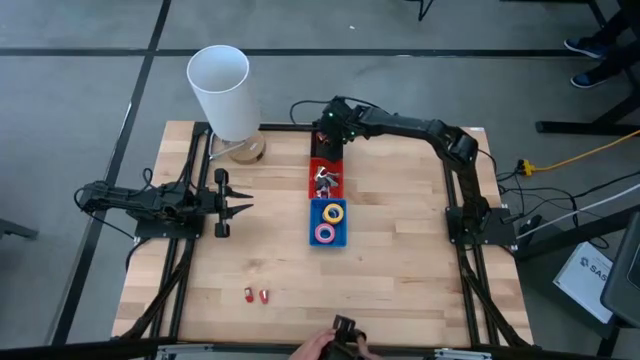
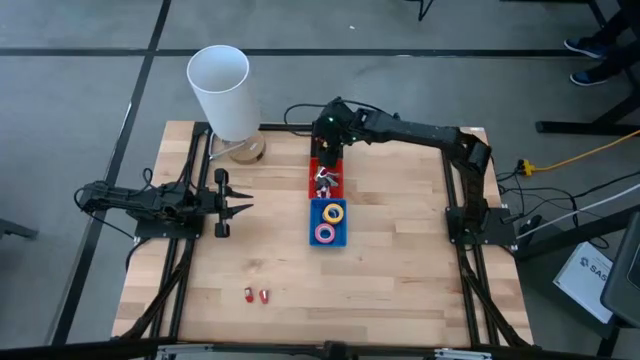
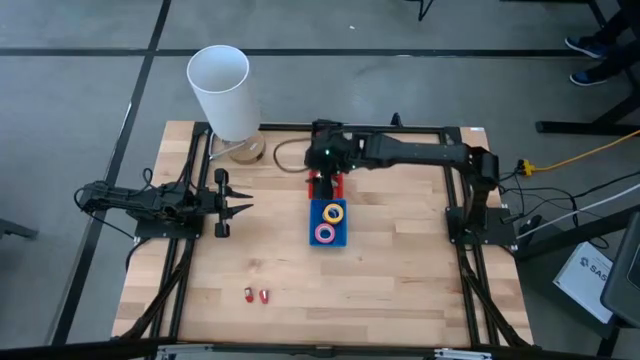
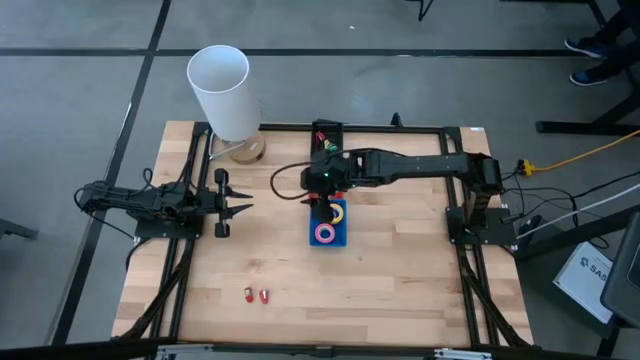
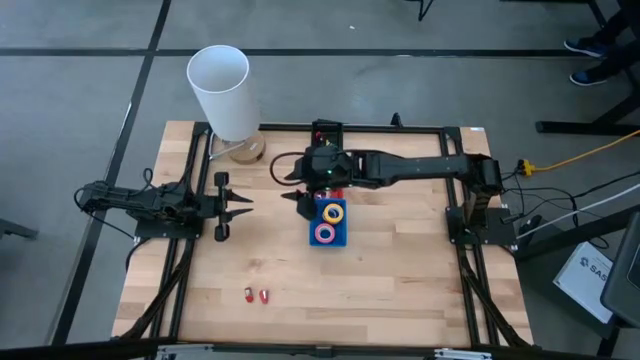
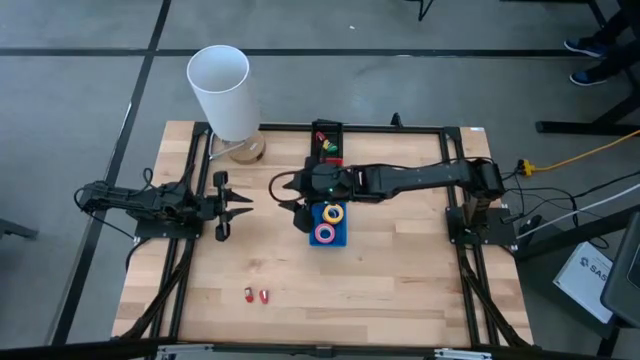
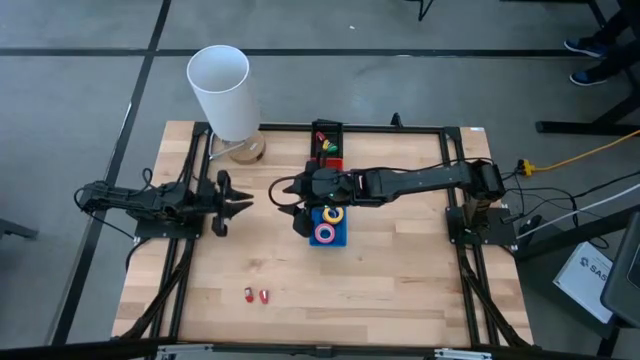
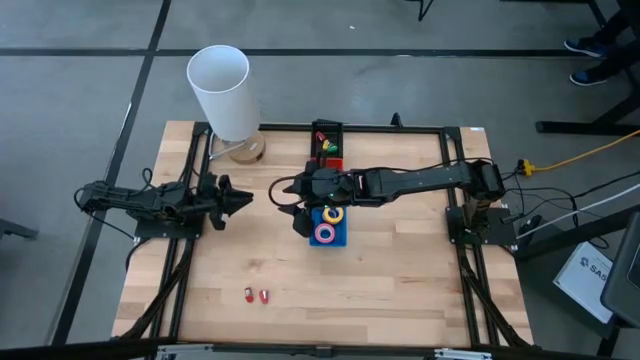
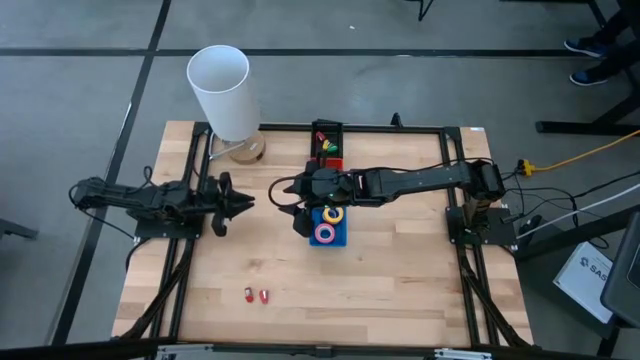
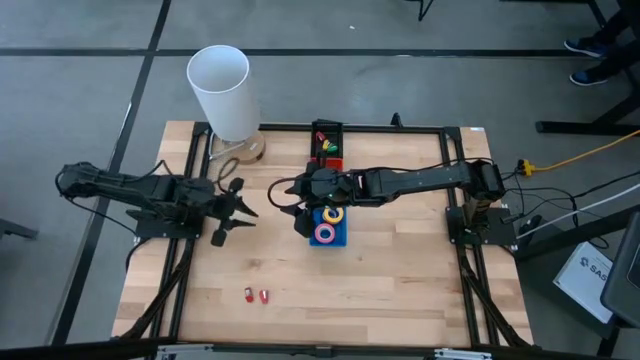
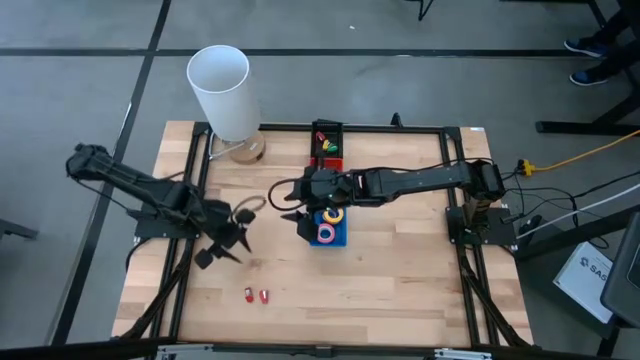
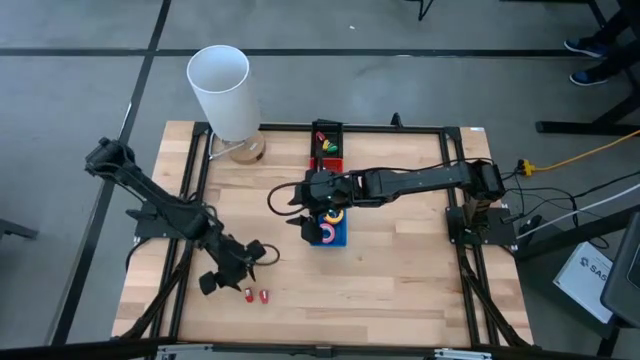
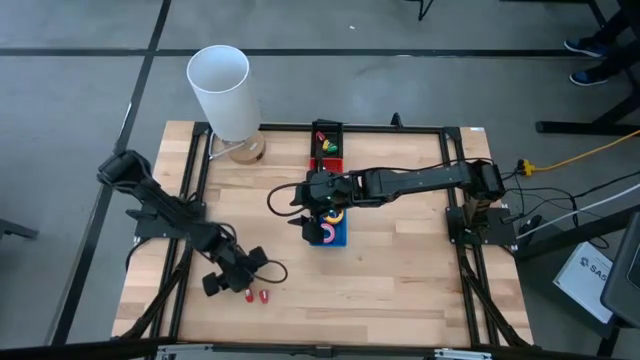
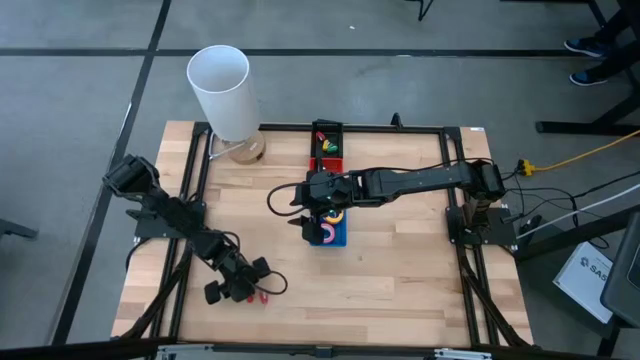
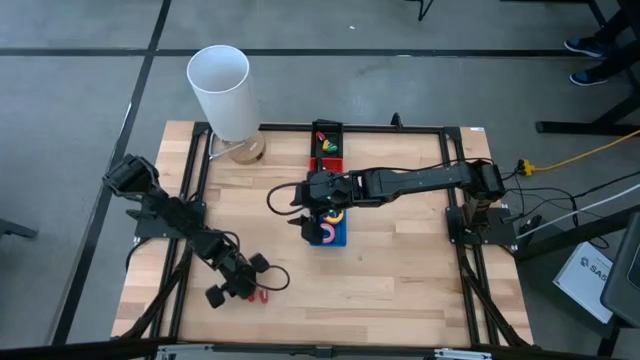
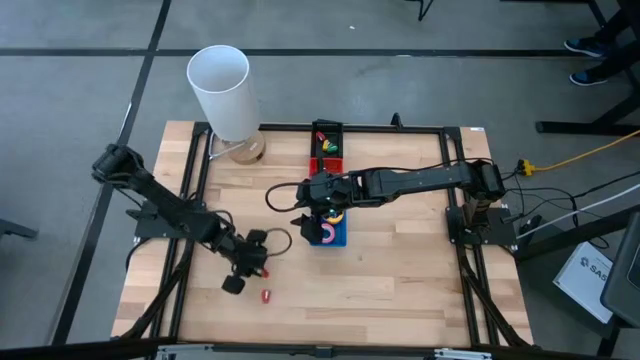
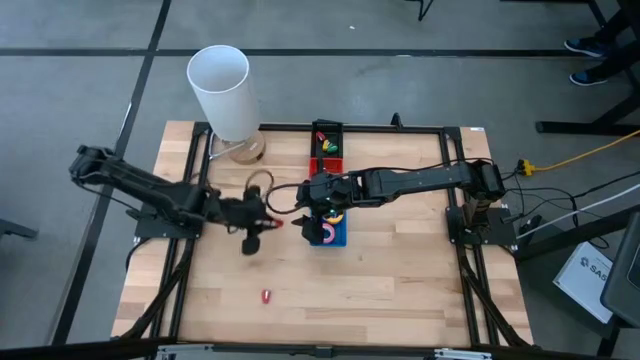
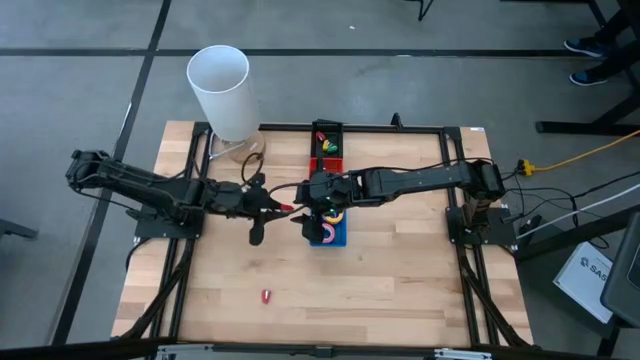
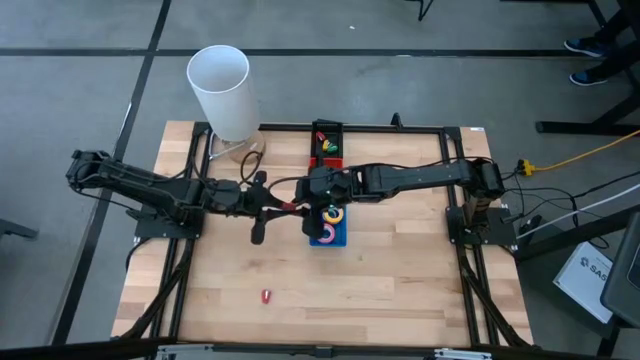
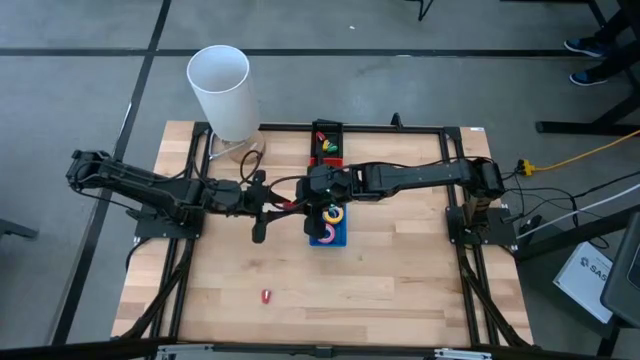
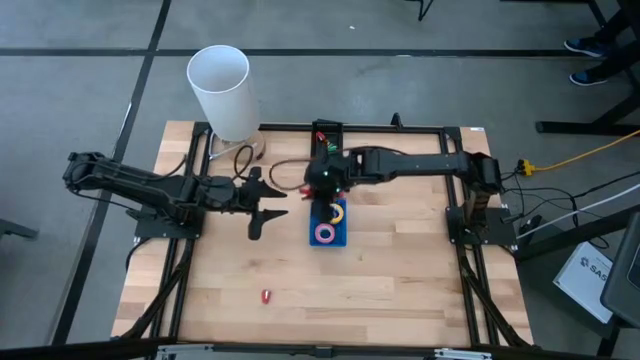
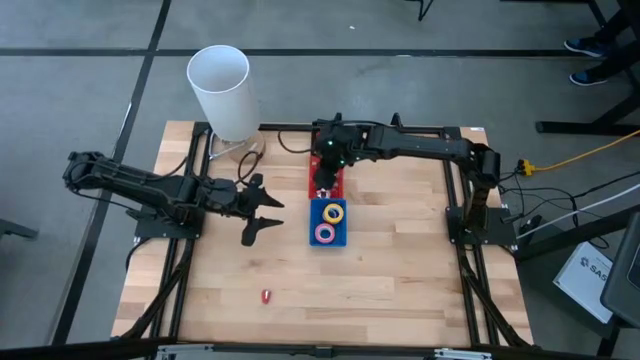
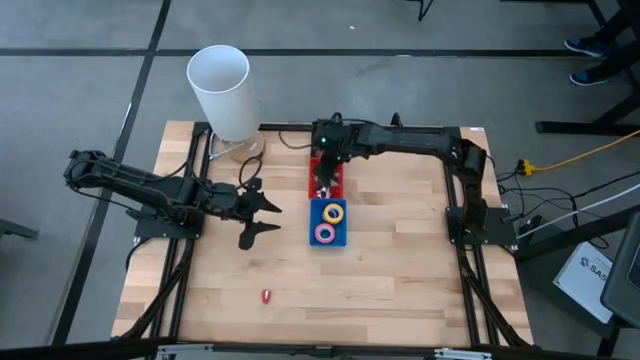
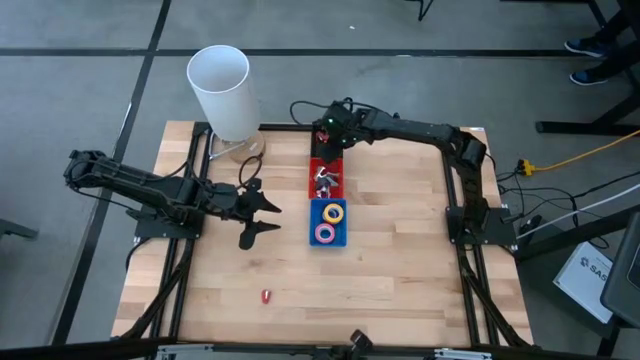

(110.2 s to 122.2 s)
Task: Pick and place Stapler, Stapler remover, tape
Put the left red stapler into the black bin

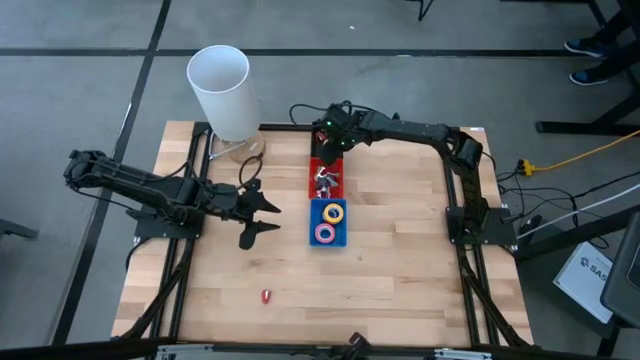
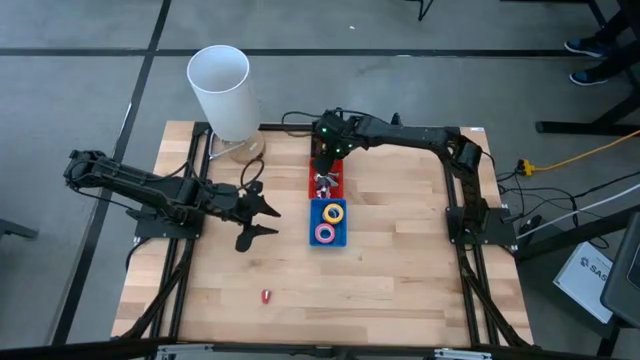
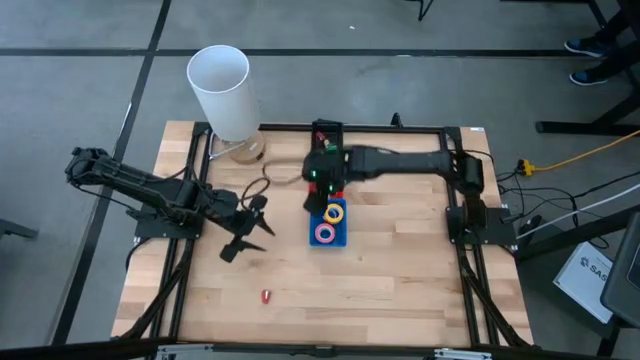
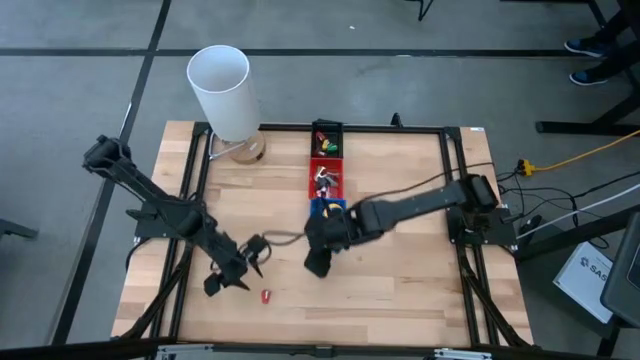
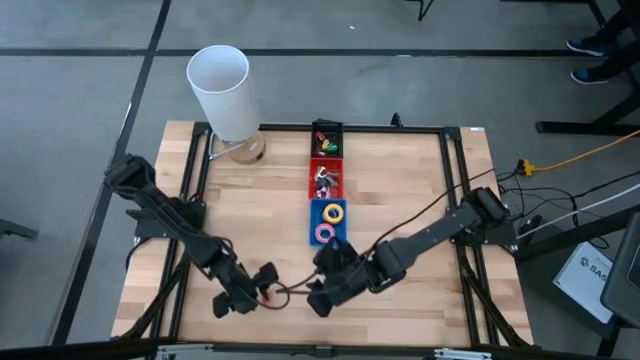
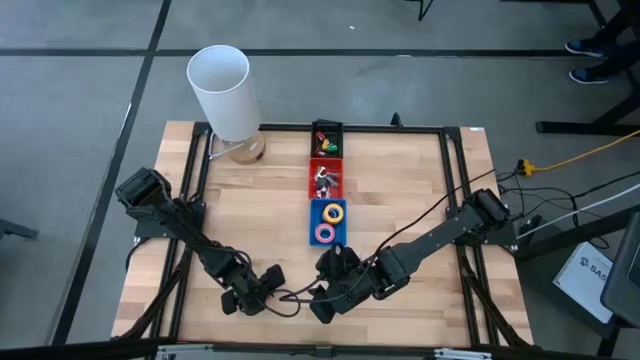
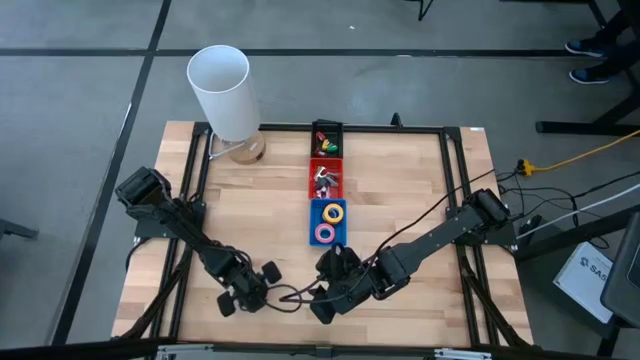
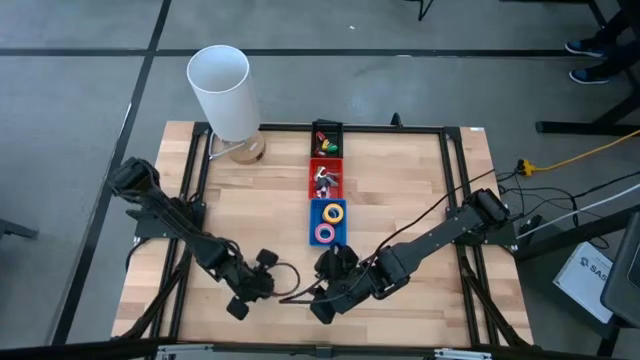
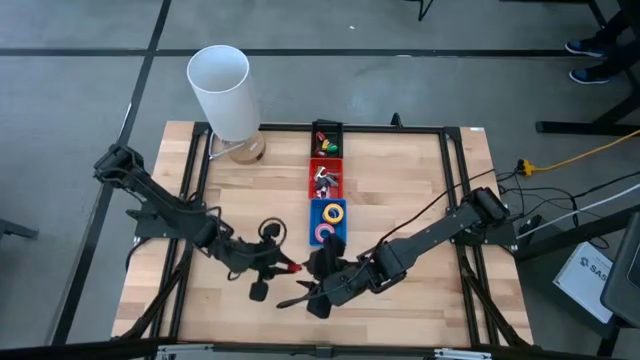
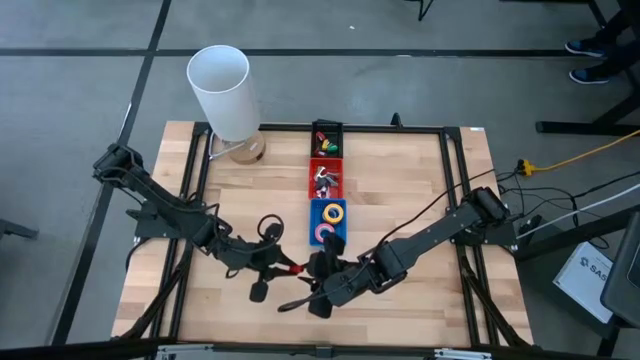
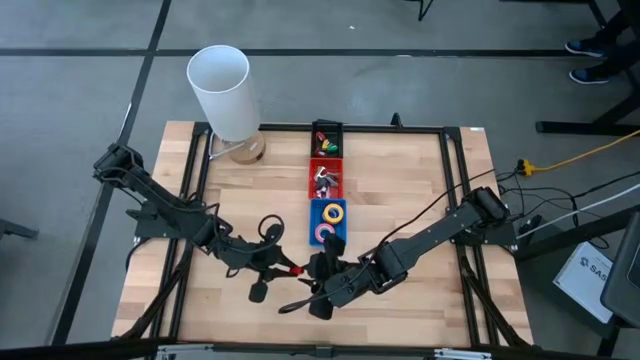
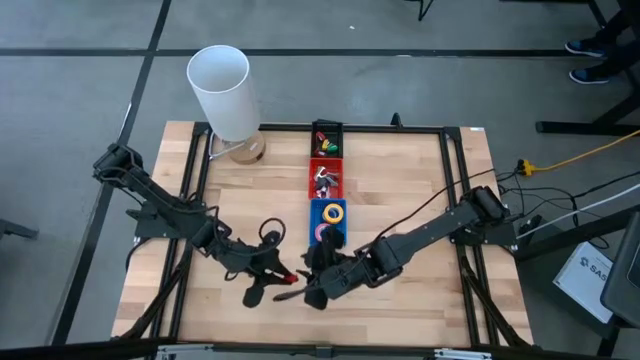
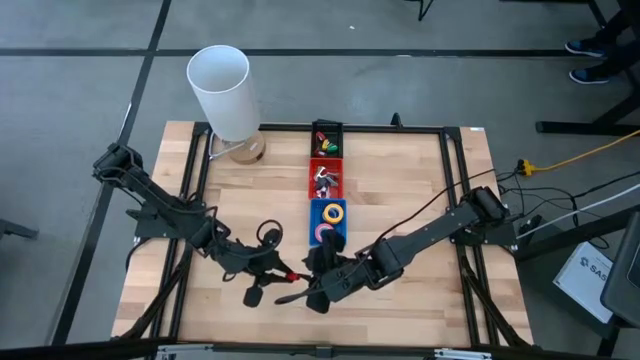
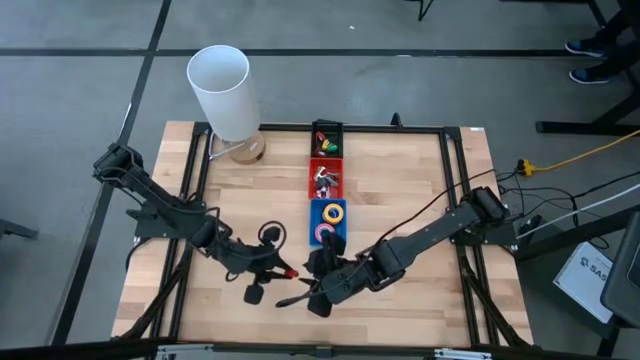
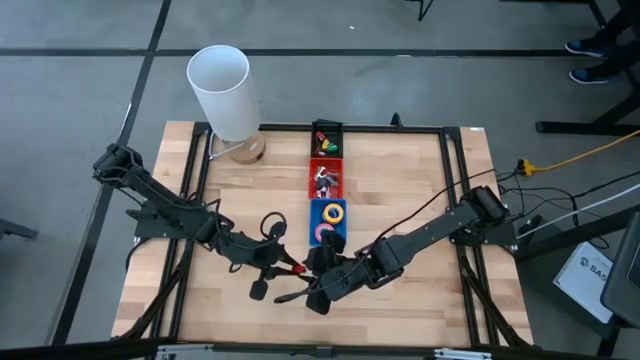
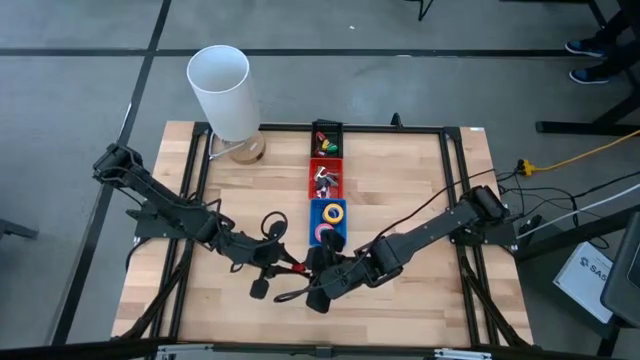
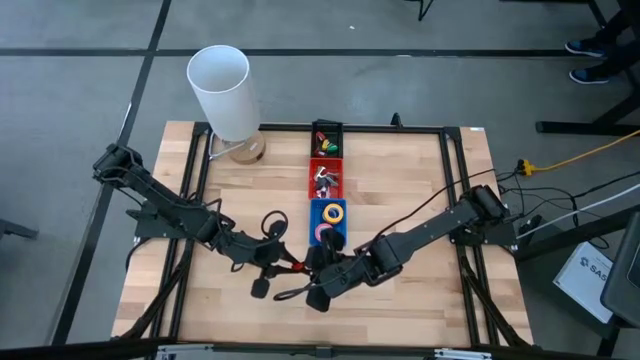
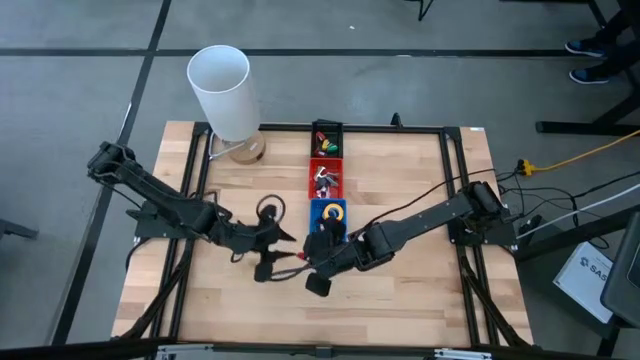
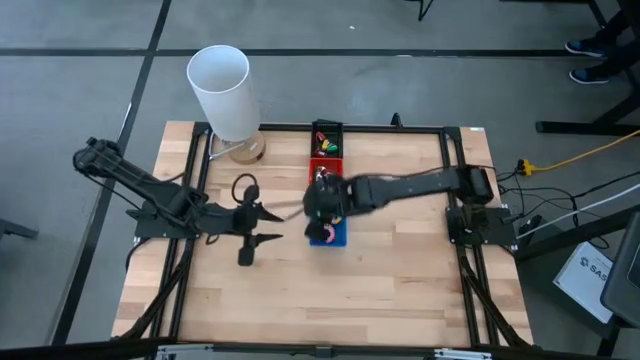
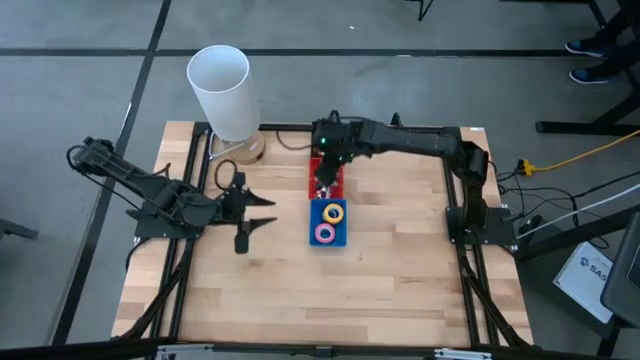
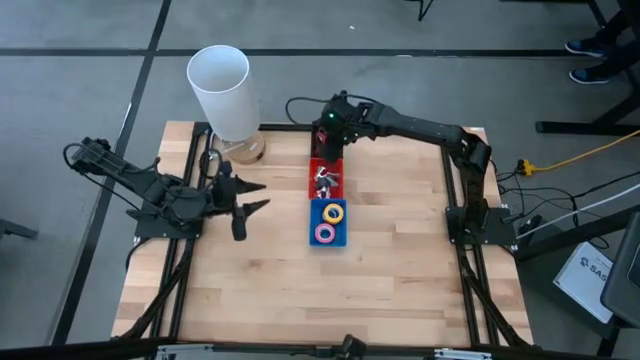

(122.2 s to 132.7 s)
Put the red stapler into the black bin
